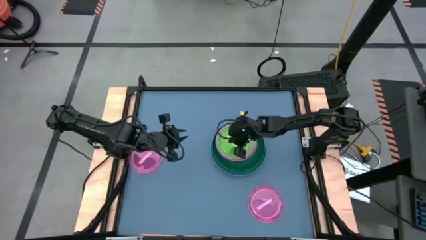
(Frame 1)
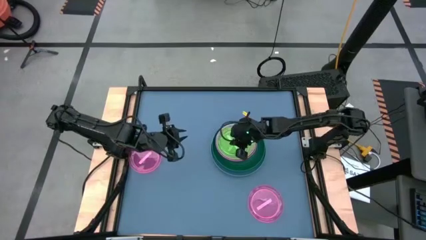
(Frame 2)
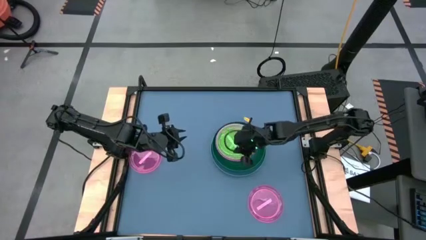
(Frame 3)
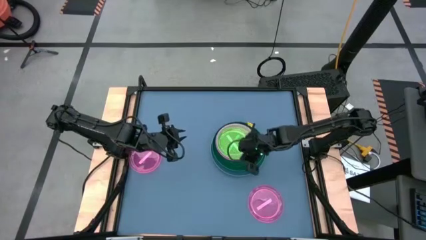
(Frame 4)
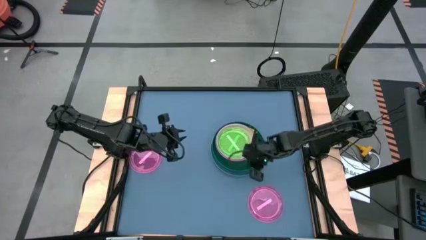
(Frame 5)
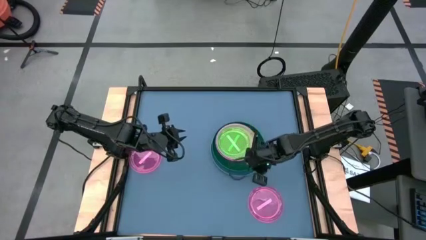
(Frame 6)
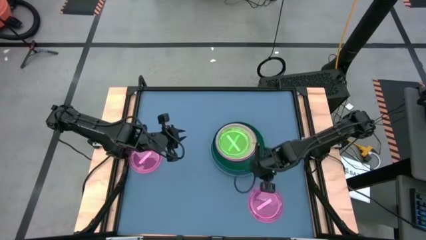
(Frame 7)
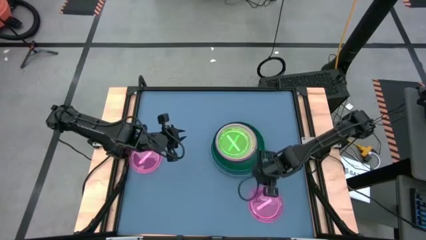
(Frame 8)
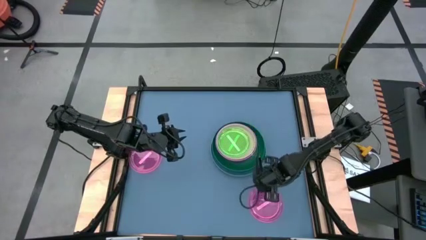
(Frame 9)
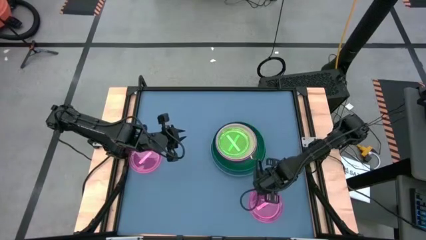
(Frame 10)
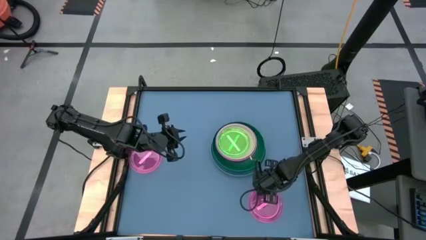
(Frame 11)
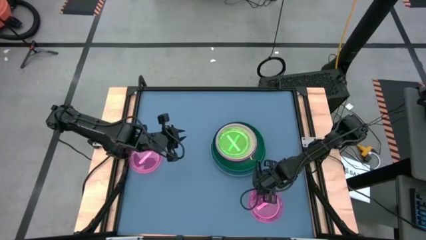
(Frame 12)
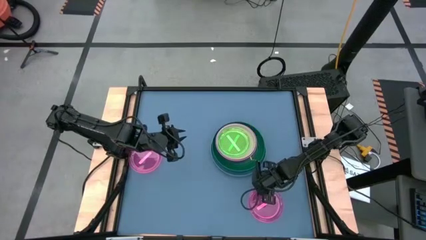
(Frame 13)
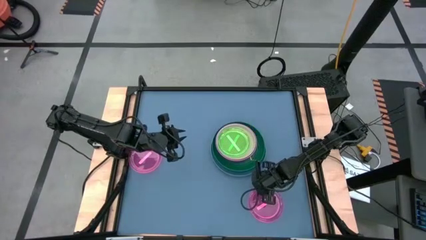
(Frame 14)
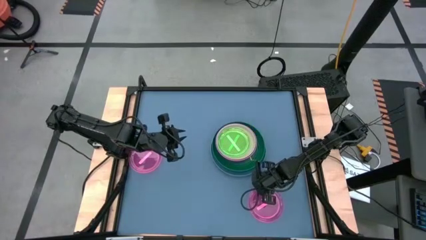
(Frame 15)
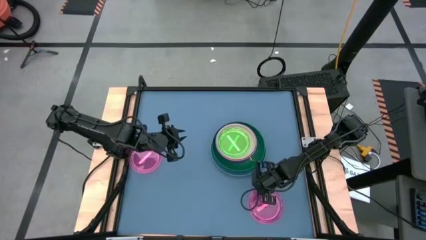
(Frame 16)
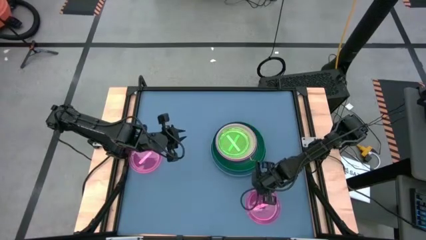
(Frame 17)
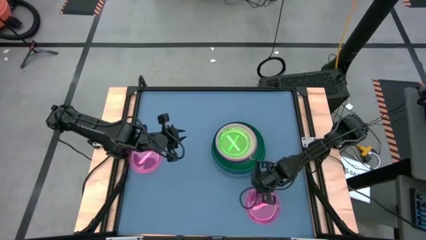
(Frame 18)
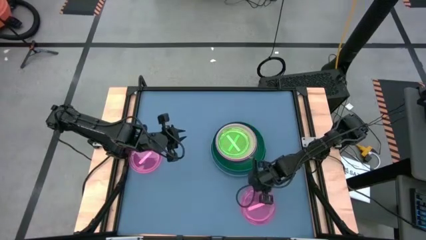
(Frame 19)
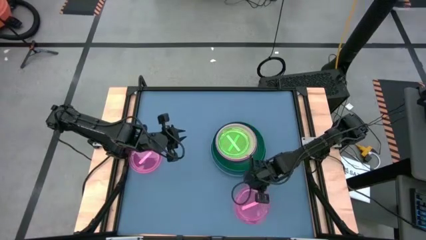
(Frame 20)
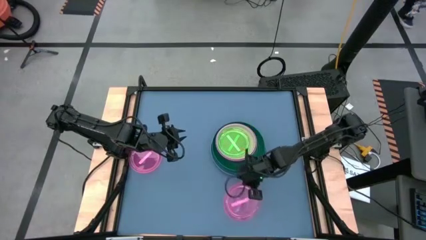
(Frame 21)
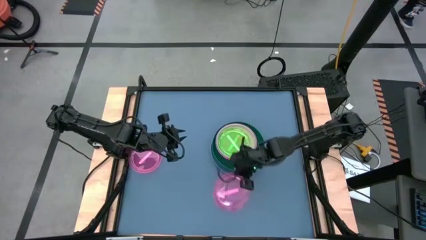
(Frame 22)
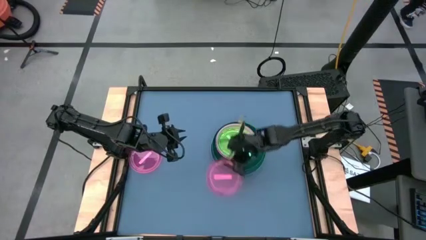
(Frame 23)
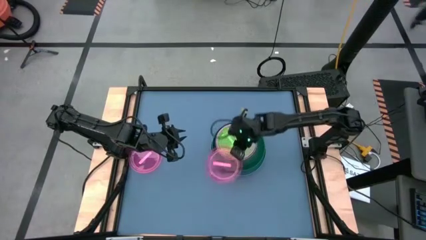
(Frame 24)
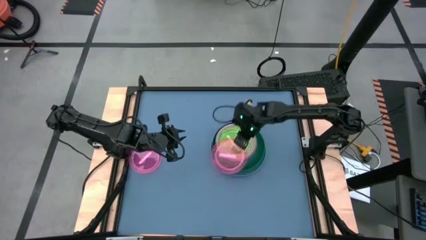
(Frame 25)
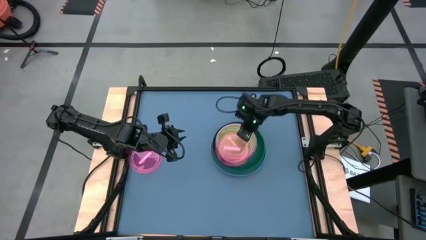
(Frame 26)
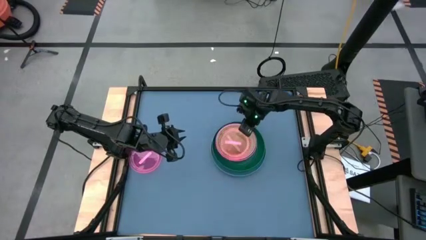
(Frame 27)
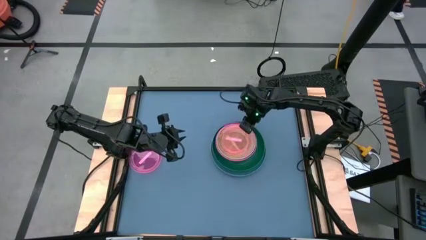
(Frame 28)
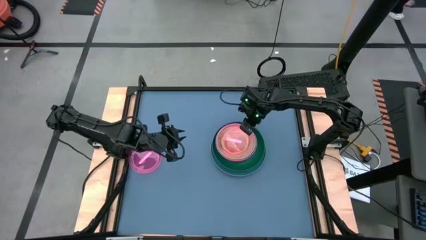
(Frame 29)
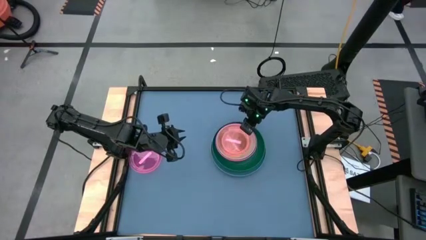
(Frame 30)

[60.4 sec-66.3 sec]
Task: Stack plastic plates
Stack the bottom light pink plate on top of the light green plate

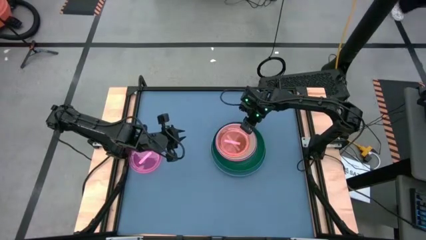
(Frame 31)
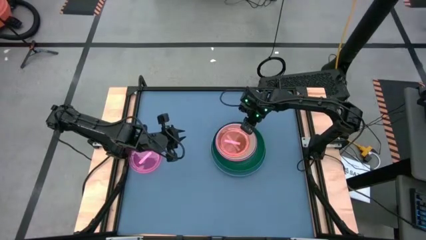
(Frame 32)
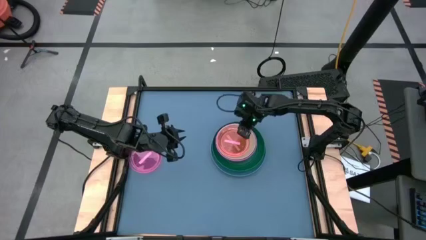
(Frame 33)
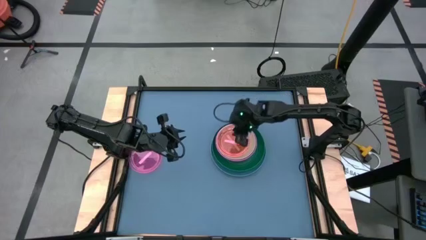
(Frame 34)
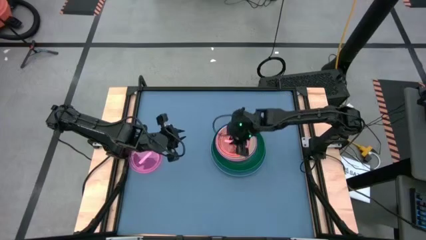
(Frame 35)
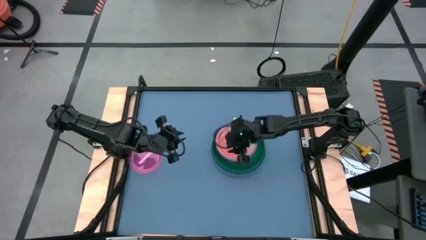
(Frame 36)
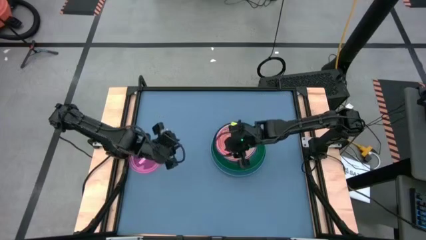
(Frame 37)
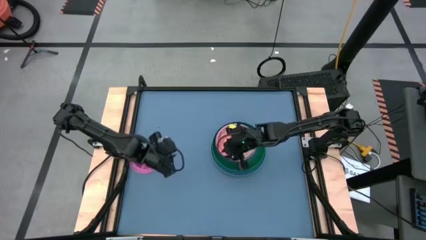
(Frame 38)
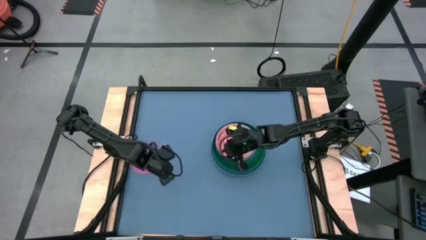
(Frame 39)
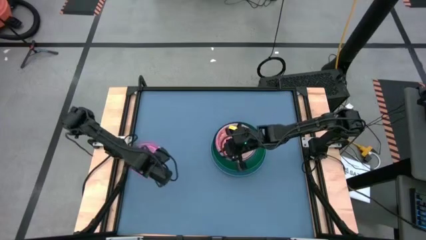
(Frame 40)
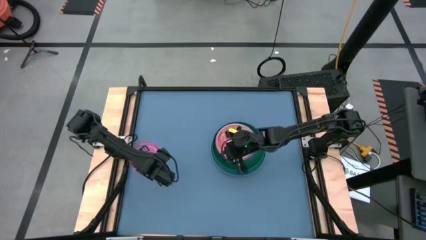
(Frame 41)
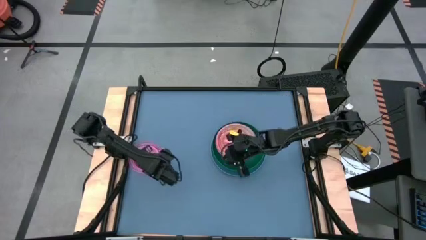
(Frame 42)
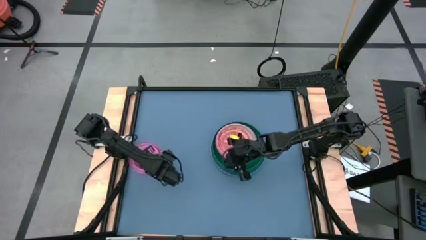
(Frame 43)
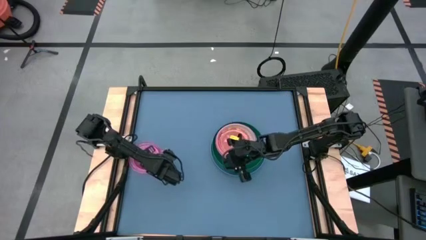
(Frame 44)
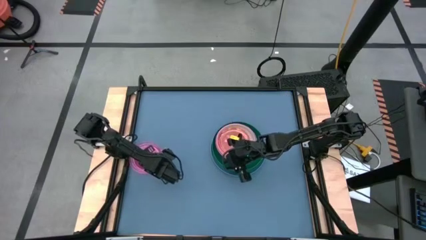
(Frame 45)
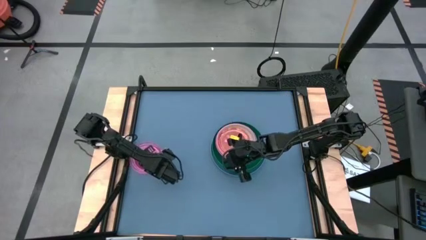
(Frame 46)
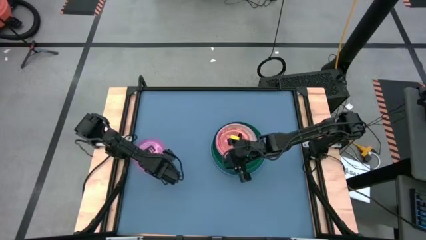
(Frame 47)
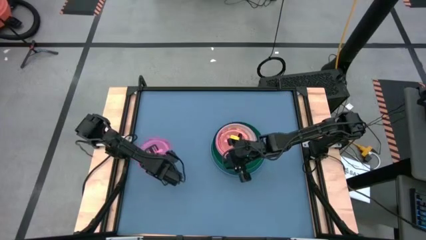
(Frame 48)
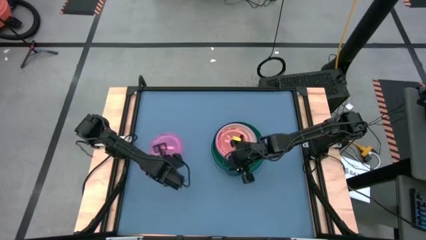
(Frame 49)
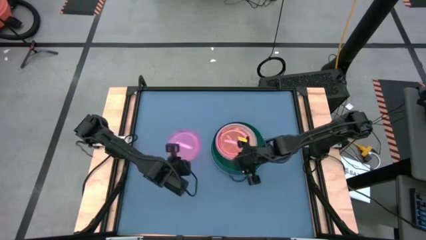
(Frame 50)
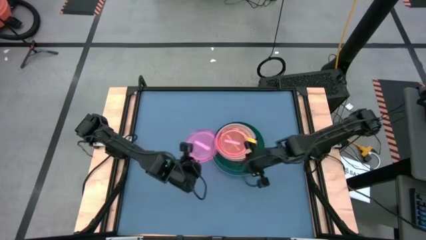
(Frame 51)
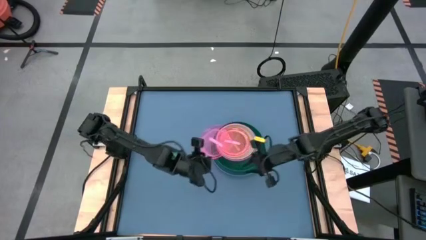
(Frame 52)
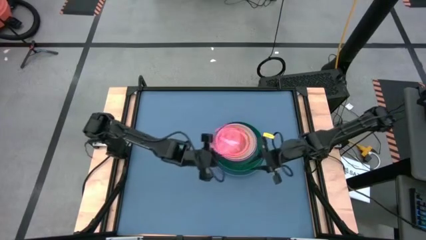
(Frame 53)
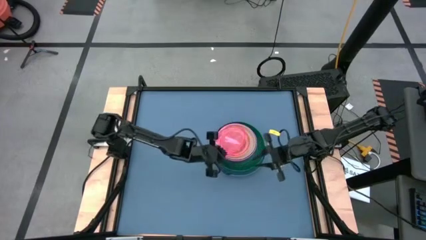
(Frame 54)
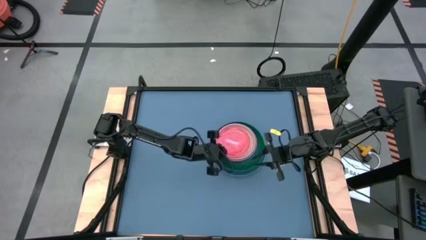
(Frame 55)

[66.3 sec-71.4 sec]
Stack the light pink plate on top of the light pink plate

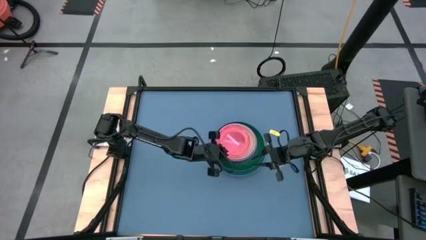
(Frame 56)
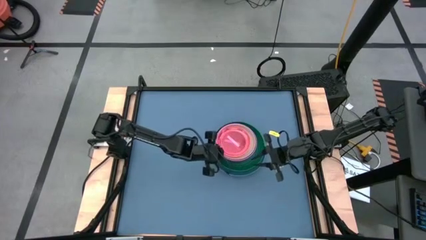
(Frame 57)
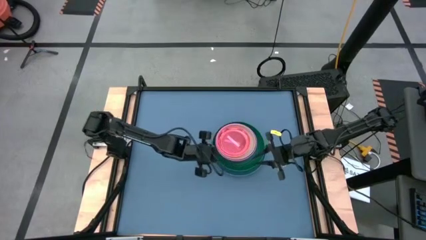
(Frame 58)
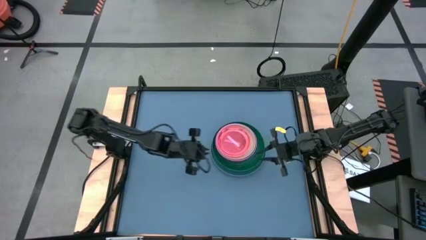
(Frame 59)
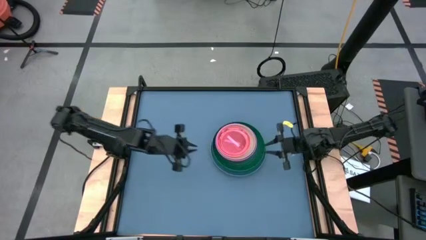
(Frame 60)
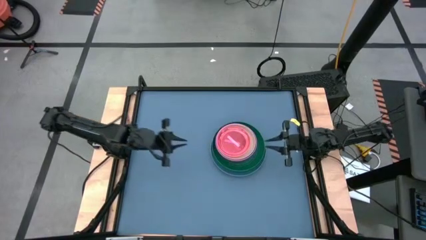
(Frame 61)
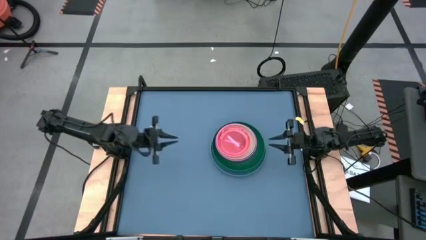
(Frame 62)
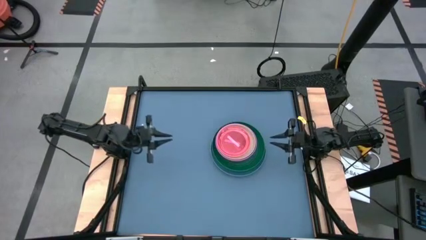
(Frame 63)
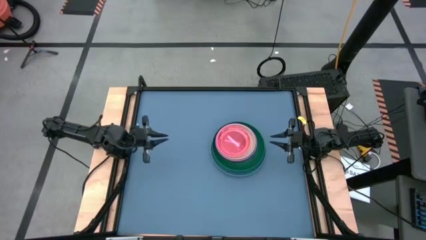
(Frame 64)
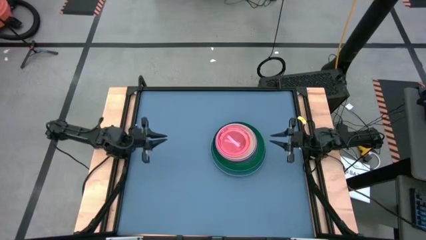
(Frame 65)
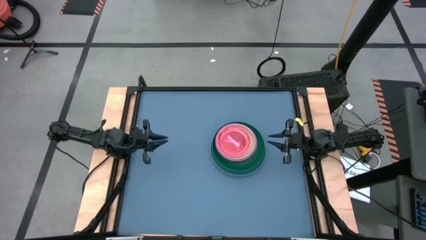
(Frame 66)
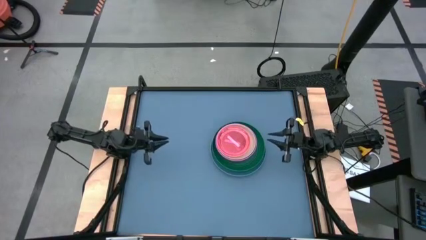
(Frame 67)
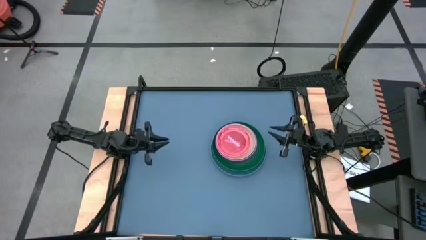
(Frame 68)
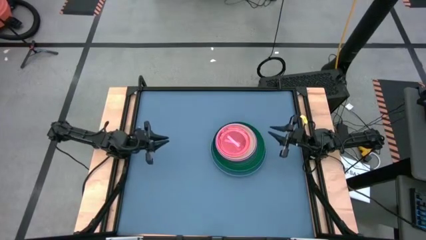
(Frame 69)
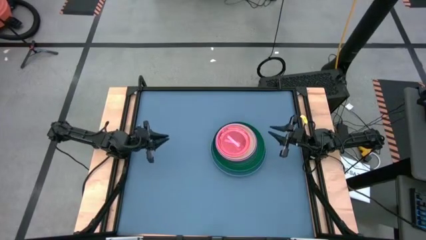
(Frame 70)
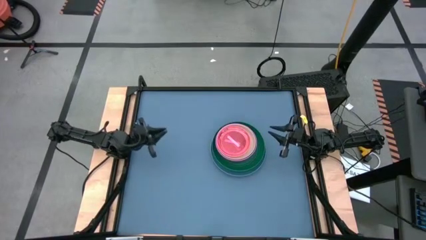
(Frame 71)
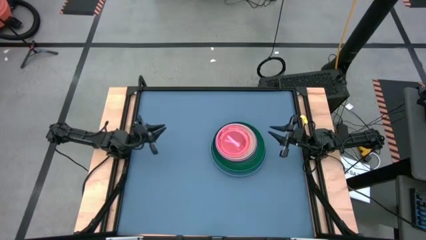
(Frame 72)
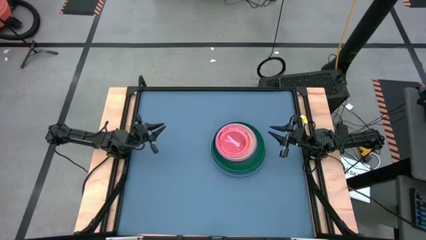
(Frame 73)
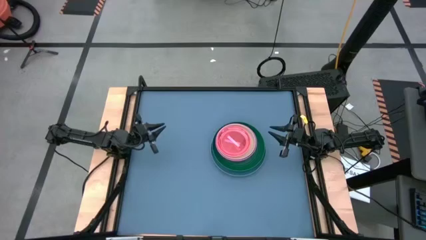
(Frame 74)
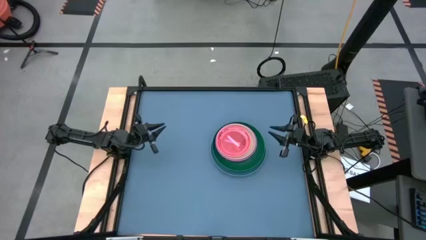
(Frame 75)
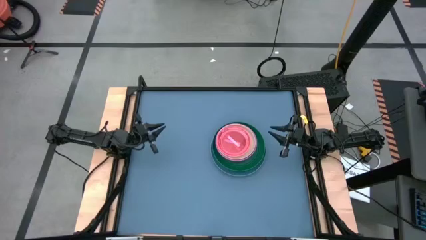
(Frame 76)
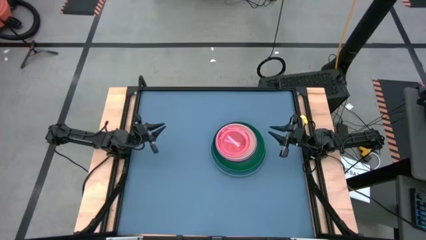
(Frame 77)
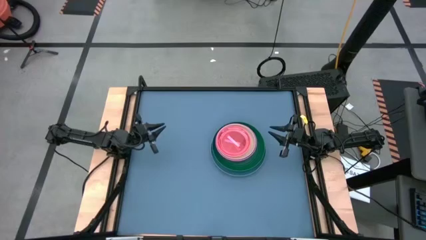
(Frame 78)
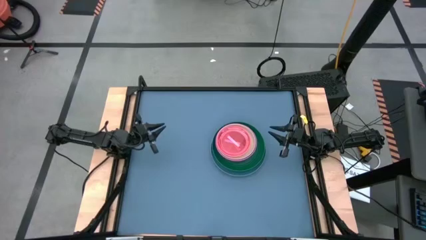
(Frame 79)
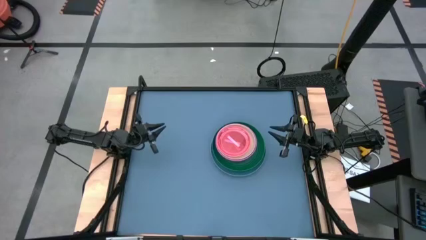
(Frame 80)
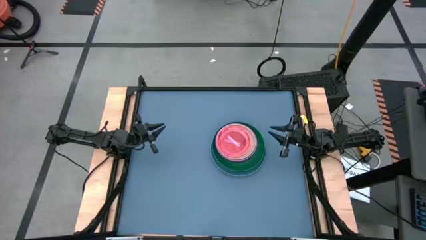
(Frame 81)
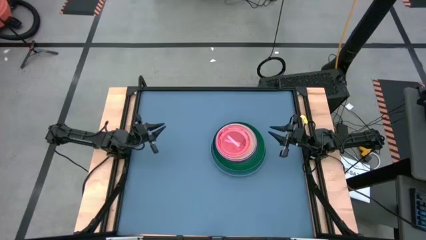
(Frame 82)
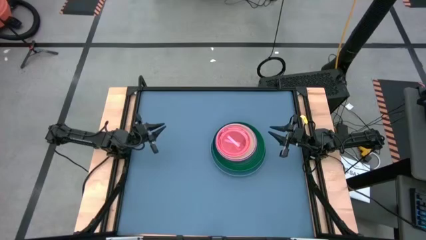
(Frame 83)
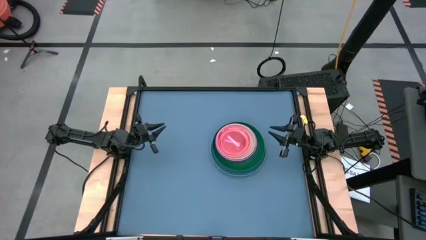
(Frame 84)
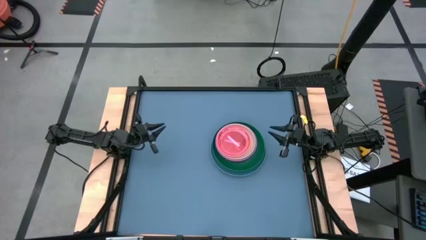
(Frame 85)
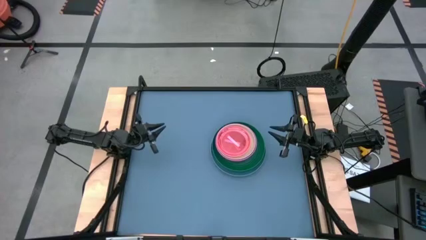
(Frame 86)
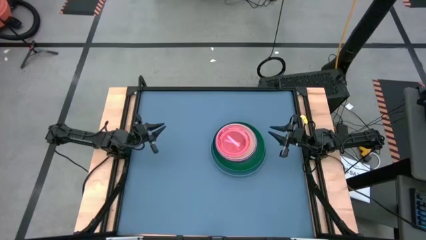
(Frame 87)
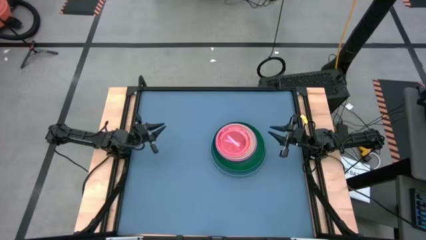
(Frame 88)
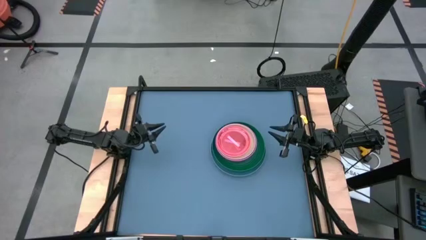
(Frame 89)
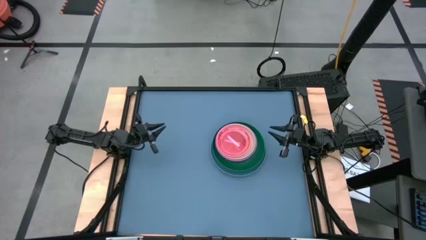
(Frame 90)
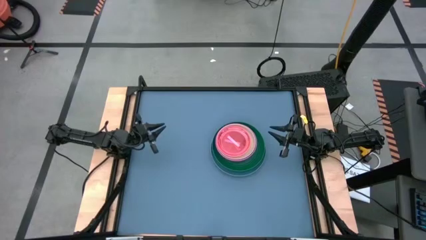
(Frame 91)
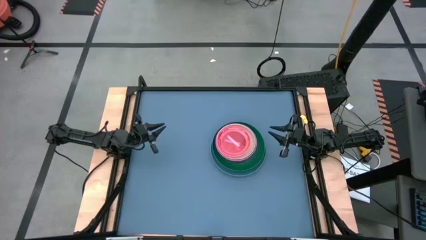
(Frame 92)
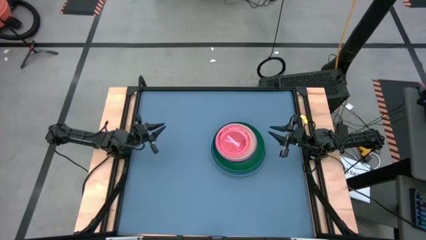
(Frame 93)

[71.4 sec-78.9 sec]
Return to Home Position
